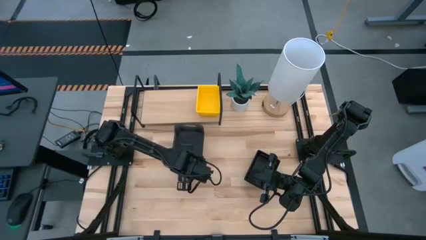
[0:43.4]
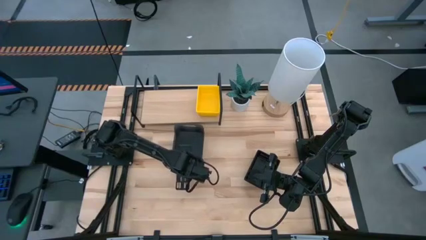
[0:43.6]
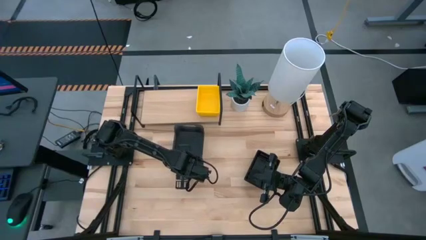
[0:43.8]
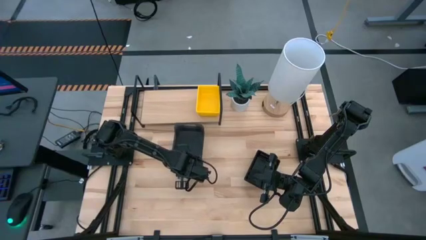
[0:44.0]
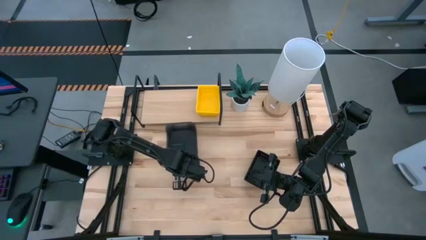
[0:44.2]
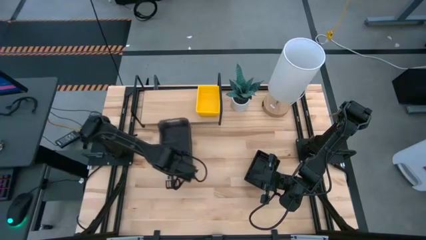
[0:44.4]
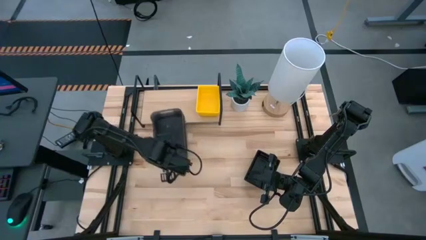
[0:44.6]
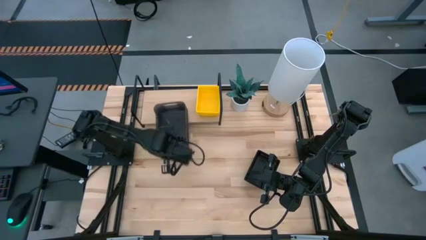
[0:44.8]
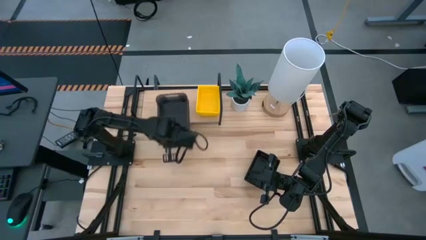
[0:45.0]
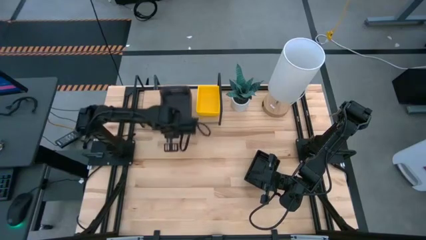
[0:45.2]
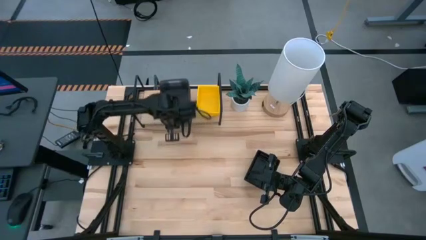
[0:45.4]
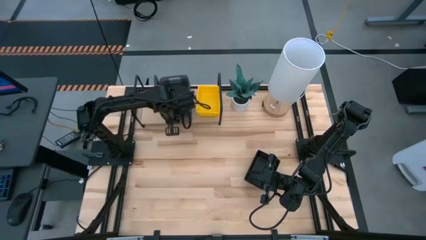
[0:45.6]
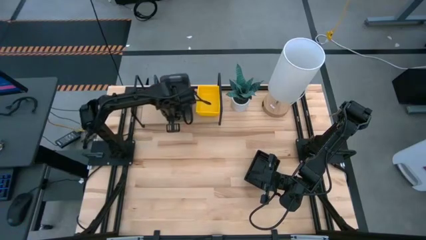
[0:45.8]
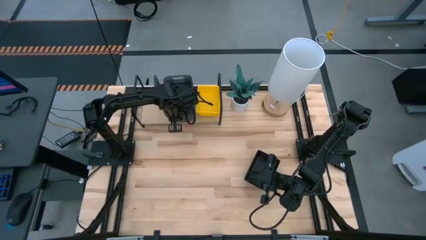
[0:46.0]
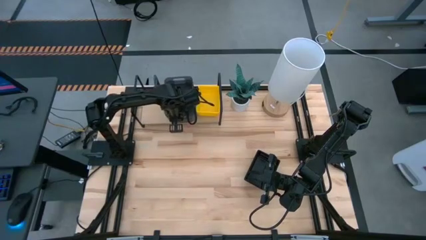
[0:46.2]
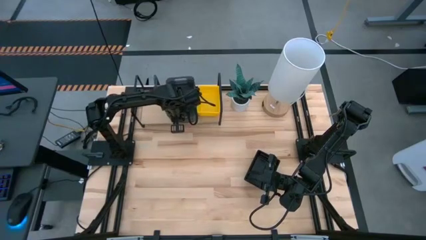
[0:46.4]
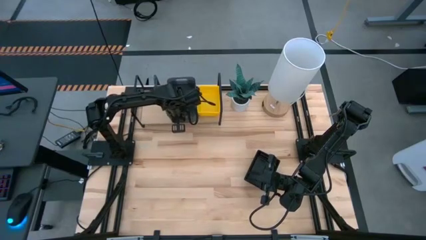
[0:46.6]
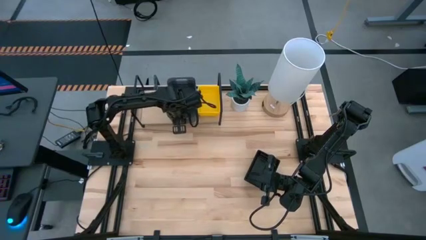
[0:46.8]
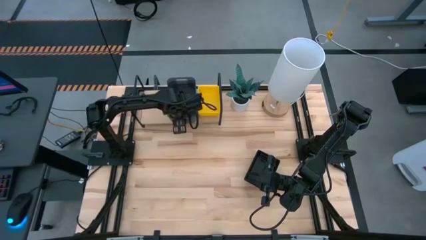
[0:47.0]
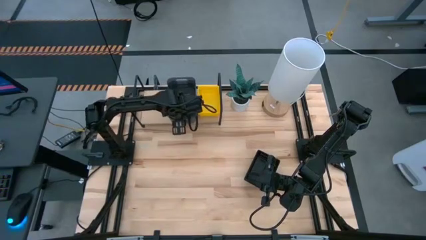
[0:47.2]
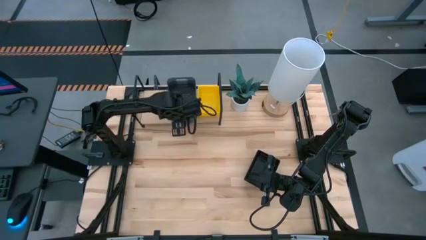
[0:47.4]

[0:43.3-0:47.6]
Task: Stack baskets on shelf by color
Put the stacked gray bin on the shelf

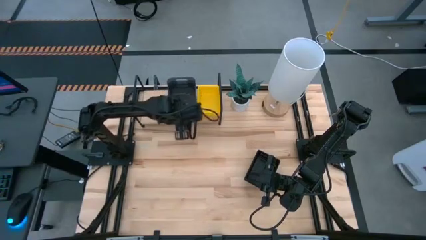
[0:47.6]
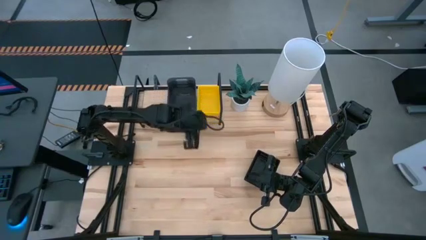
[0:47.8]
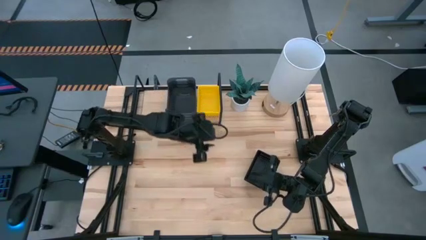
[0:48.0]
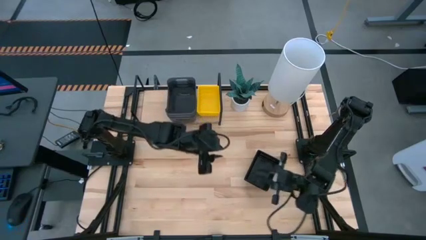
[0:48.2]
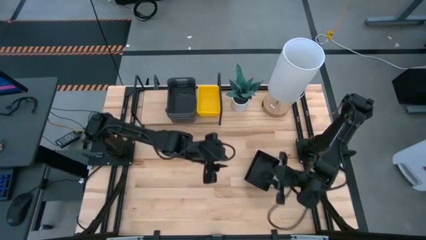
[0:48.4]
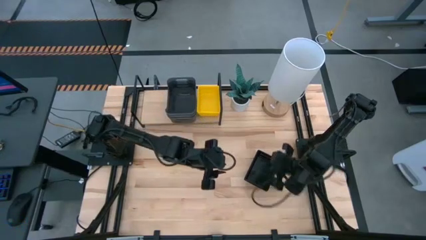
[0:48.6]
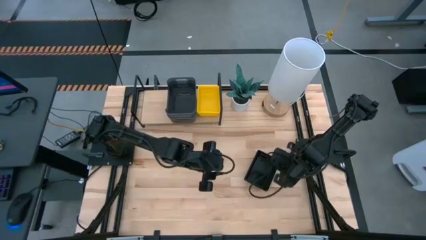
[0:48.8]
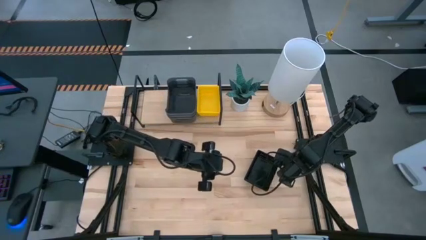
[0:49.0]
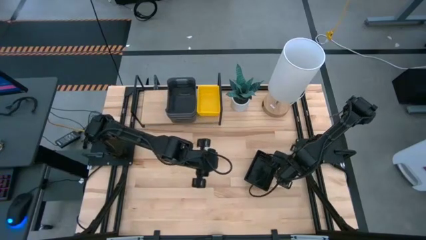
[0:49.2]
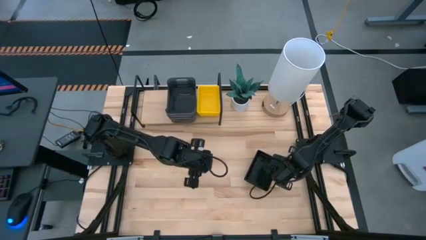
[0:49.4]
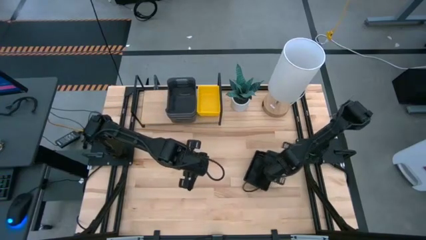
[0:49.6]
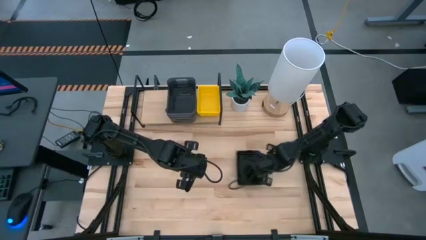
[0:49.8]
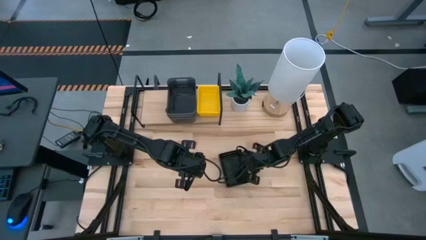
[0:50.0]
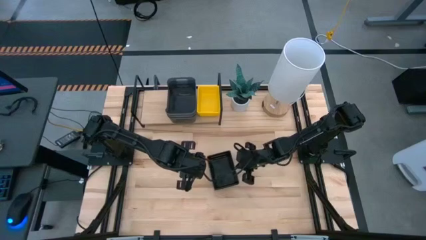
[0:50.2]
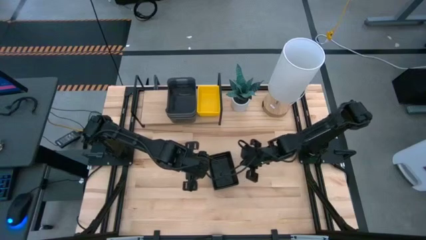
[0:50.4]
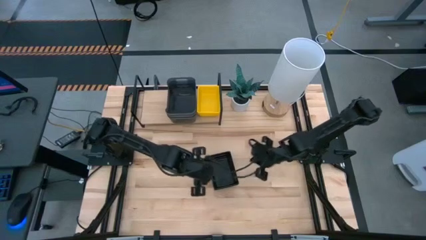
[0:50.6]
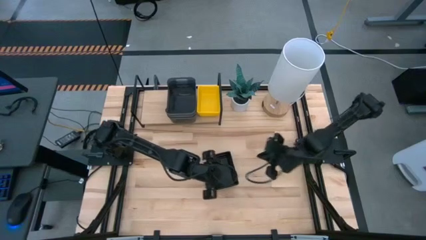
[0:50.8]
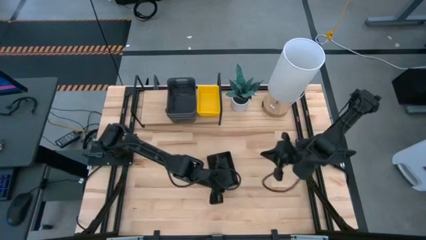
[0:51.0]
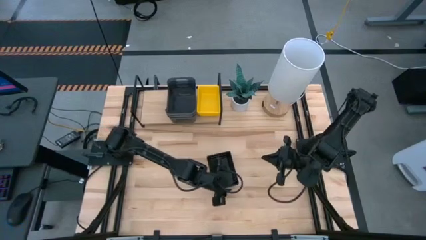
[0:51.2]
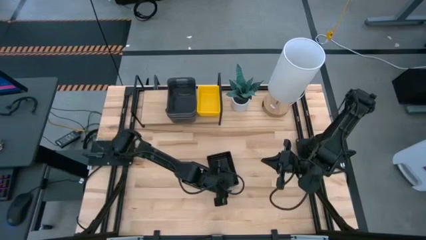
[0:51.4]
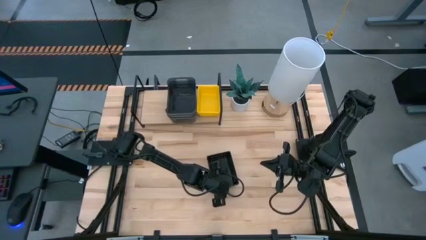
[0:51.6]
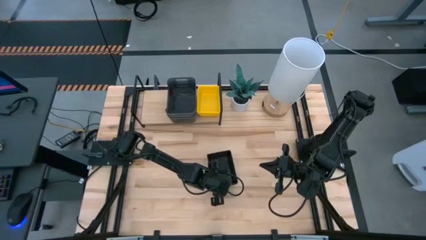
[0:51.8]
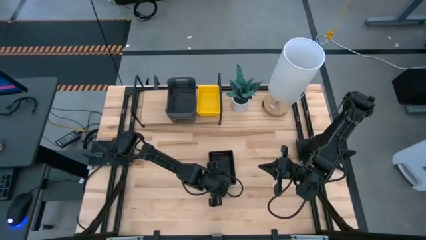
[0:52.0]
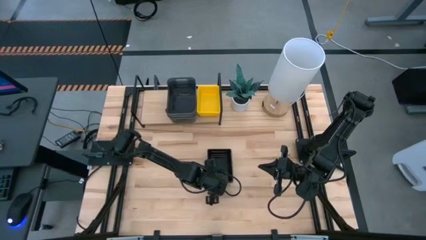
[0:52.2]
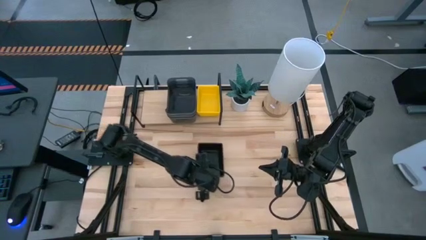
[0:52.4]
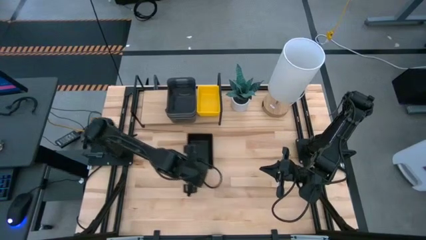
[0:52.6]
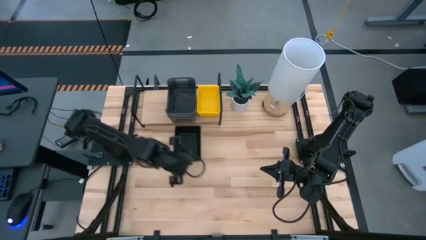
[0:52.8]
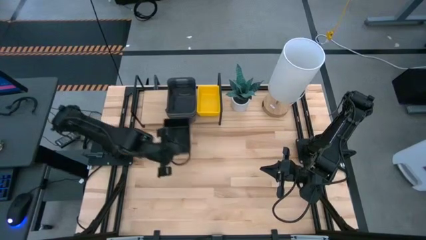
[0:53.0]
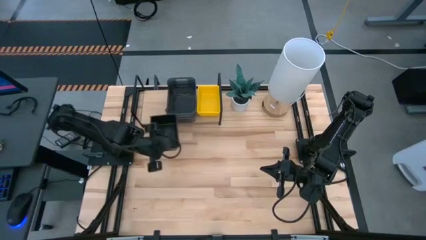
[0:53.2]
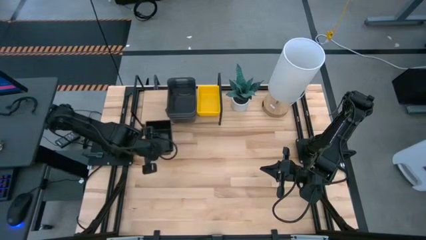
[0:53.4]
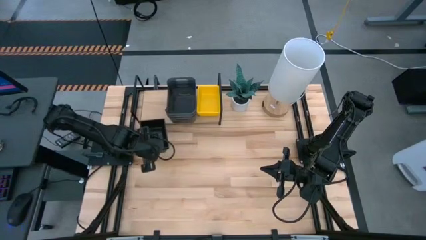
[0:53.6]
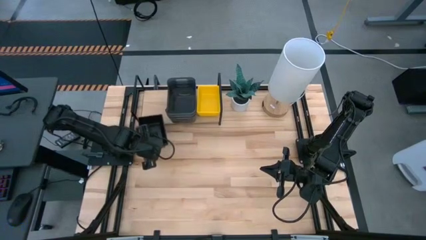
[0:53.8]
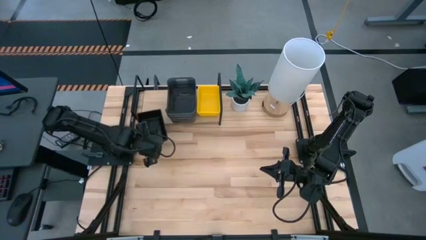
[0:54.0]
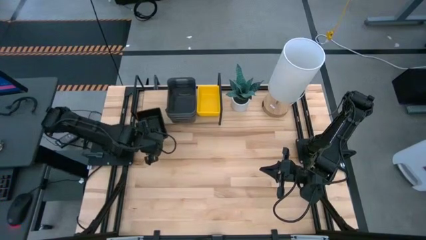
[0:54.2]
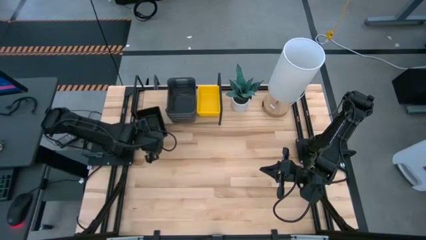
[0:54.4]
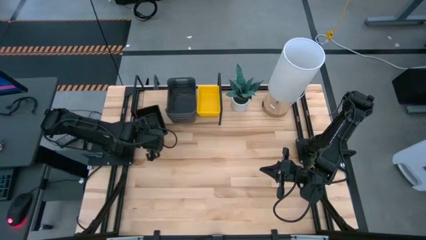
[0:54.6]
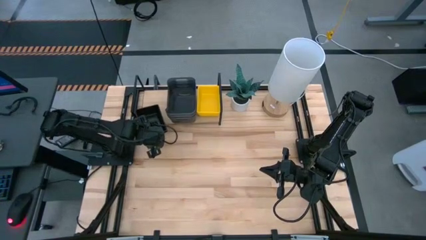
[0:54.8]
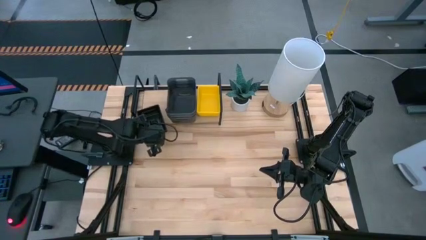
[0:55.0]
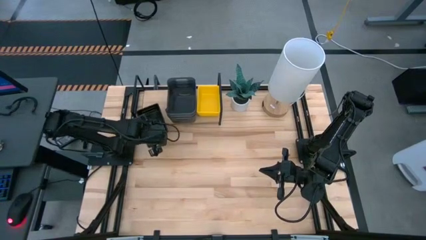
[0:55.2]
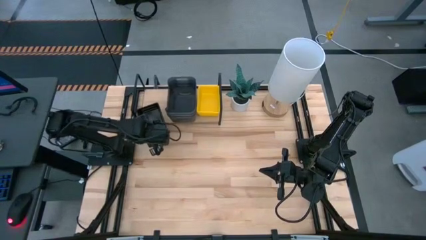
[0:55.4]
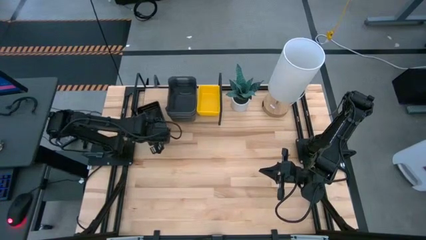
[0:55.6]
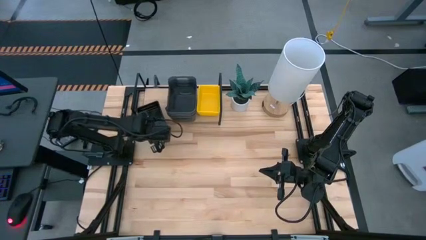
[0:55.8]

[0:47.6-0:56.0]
Put the stacked black bin on the shelf

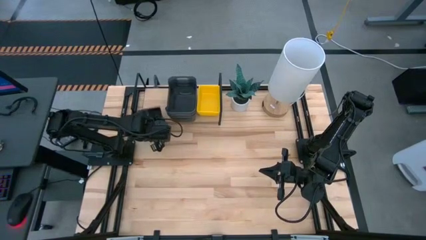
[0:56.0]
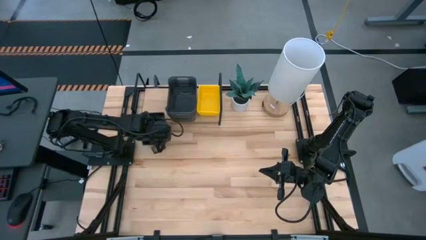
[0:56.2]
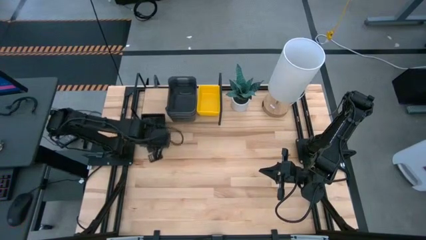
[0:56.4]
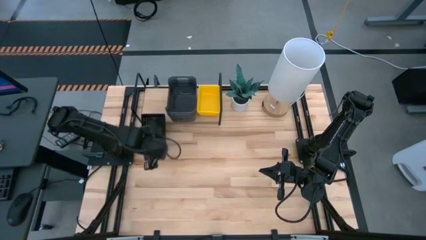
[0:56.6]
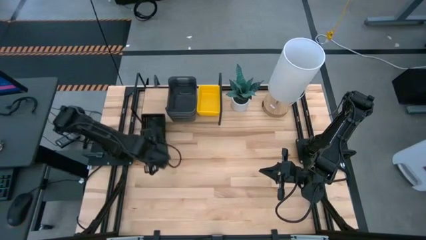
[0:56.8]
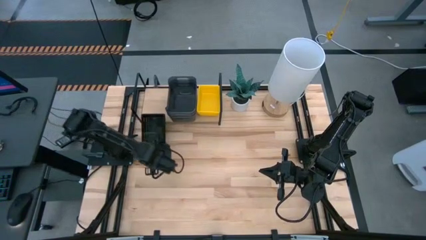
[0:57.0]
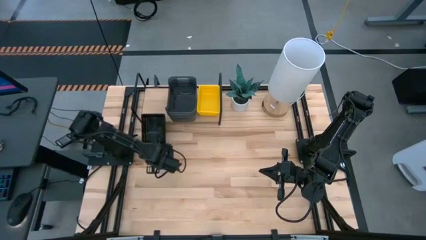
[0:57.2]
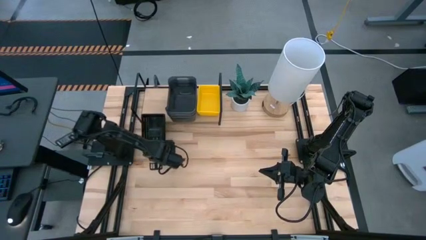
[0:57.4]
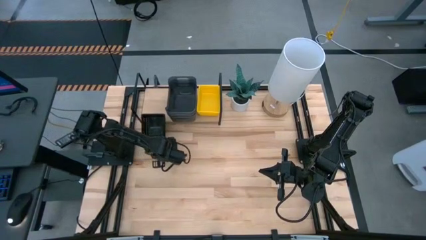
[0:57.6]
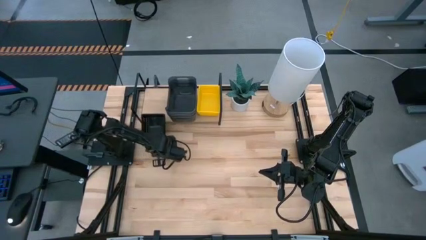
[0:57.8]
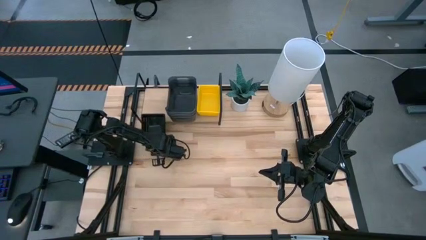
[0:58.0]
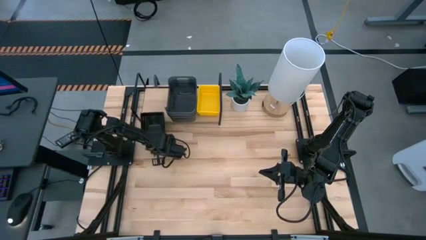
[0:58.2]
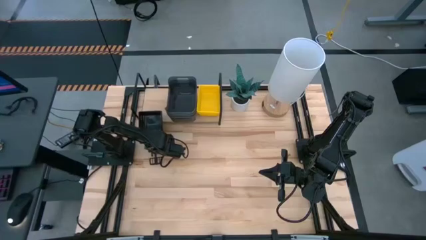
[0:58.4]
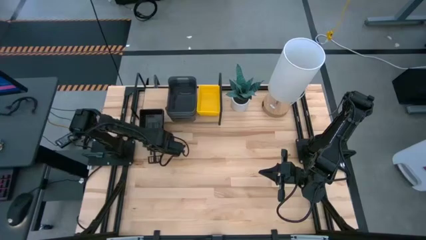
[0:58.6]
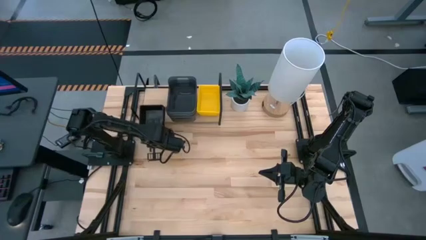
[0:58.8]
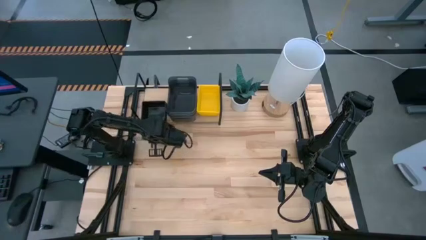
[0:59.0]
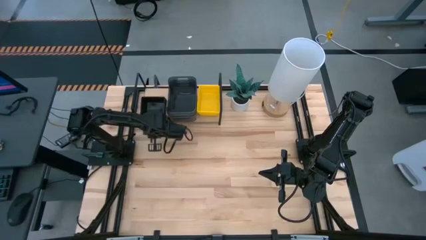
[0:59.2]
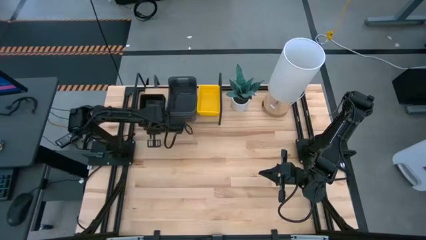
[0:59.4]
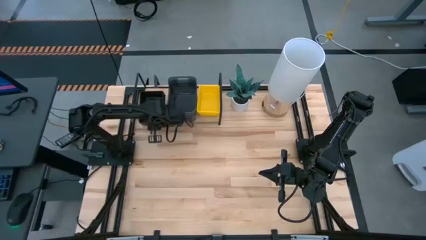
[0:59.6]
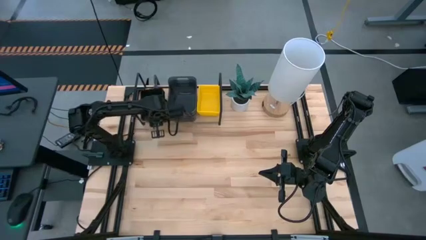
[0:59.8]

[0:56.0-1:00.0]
Put the stacked black bin on the shelf
